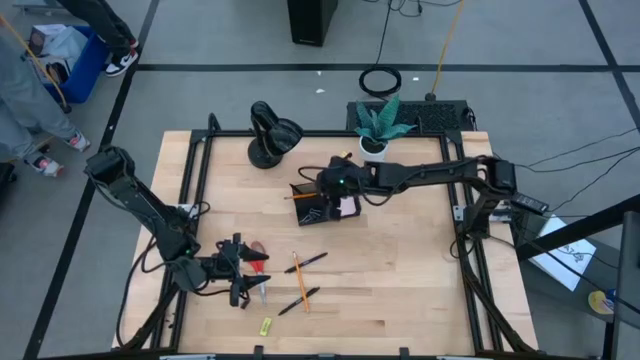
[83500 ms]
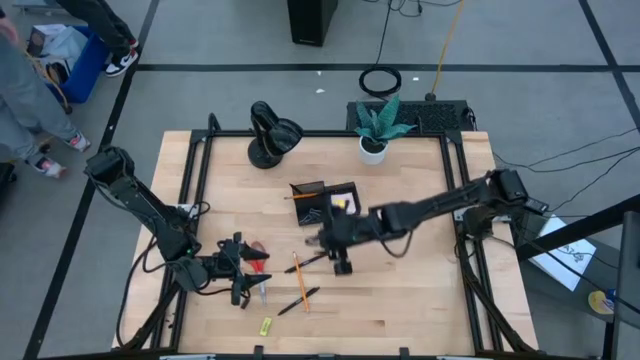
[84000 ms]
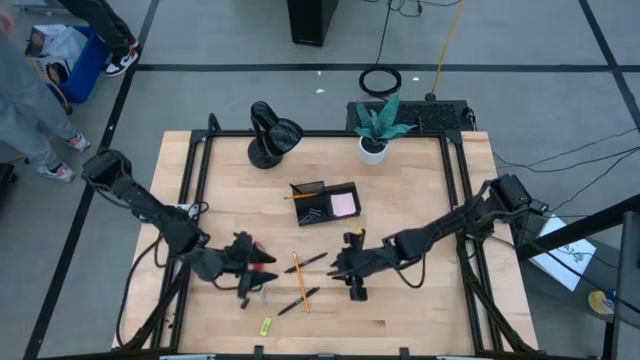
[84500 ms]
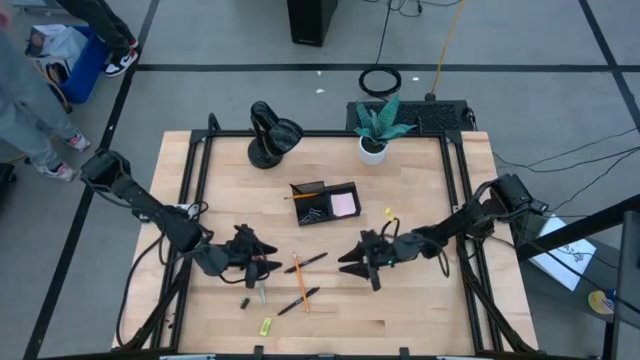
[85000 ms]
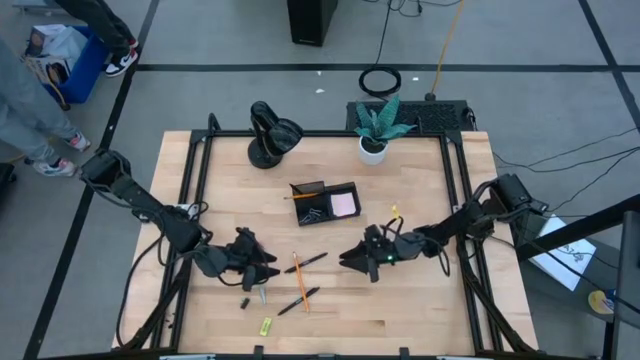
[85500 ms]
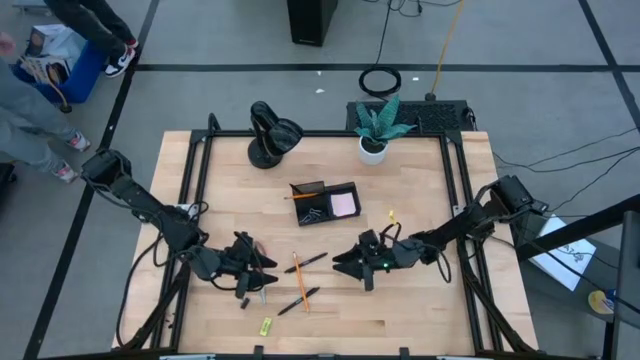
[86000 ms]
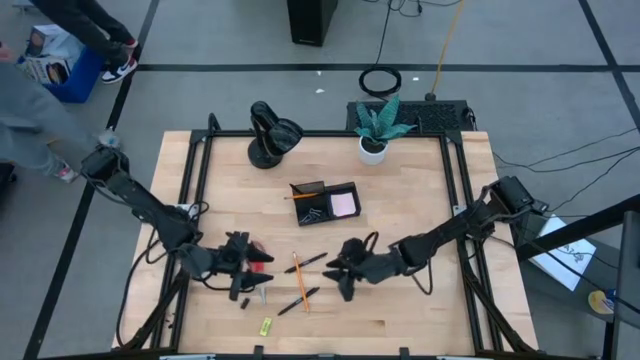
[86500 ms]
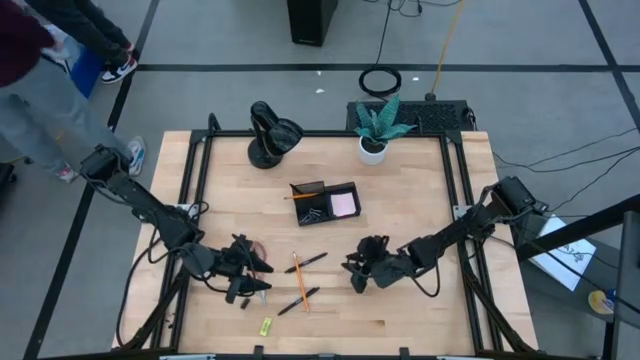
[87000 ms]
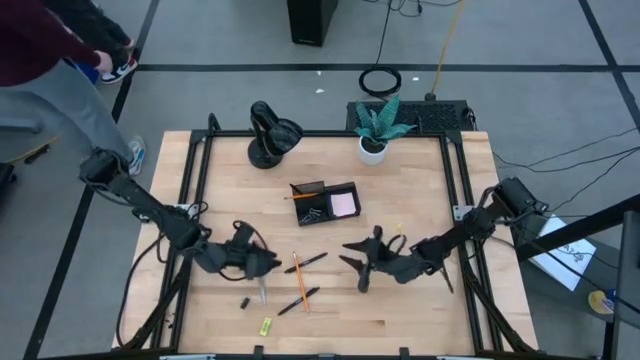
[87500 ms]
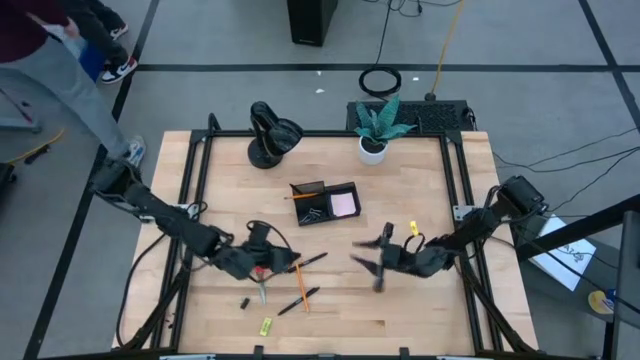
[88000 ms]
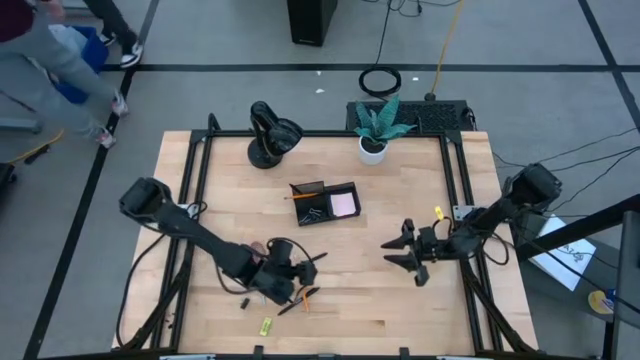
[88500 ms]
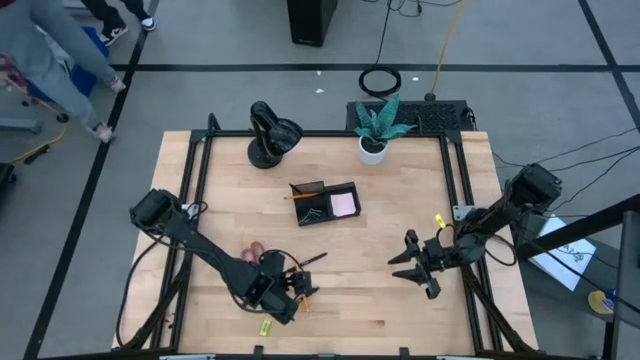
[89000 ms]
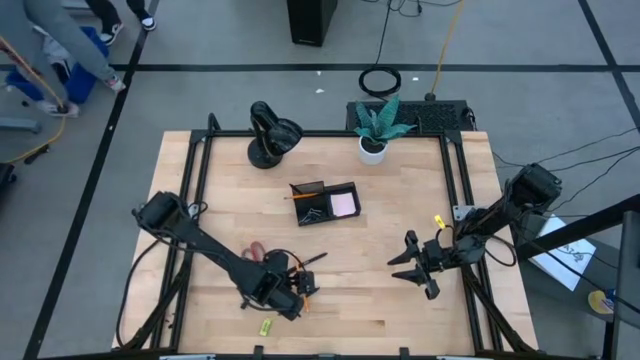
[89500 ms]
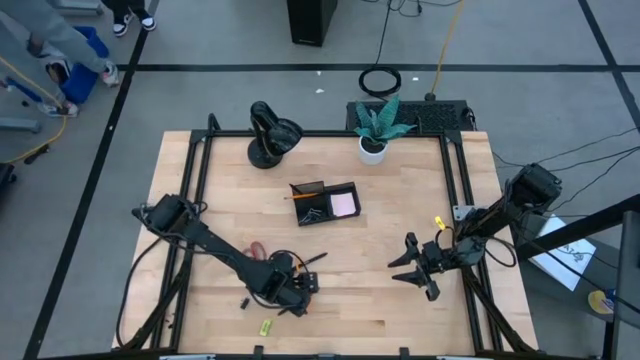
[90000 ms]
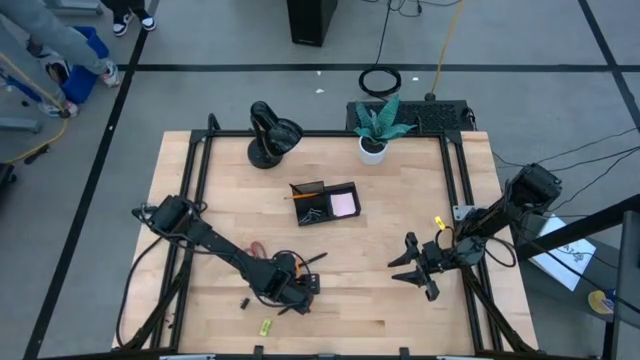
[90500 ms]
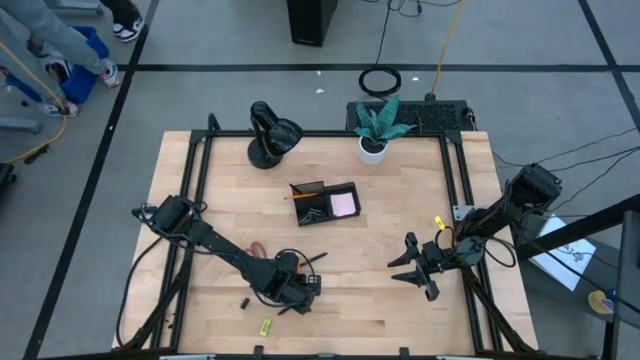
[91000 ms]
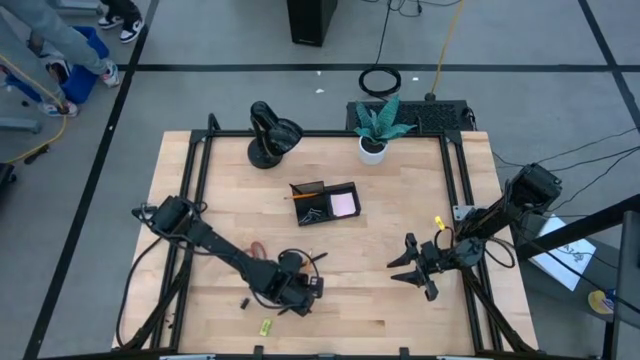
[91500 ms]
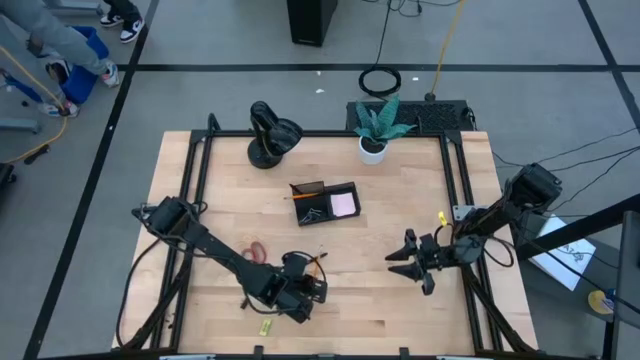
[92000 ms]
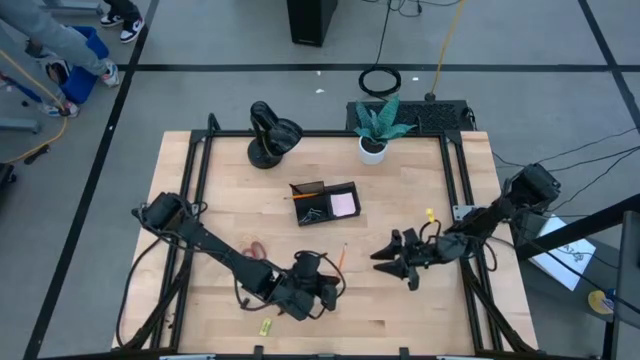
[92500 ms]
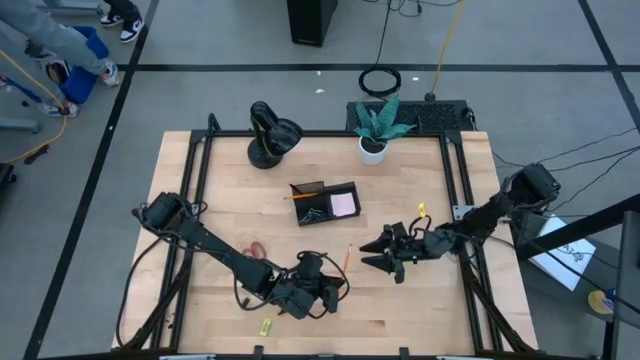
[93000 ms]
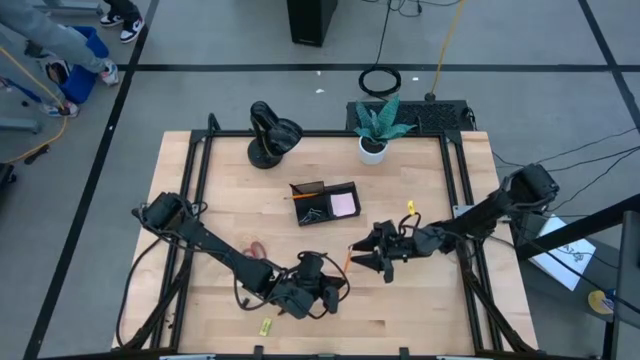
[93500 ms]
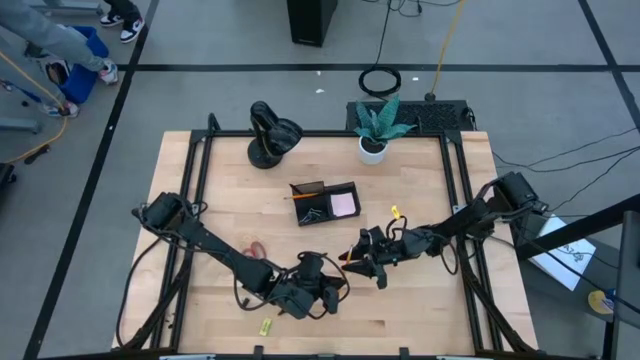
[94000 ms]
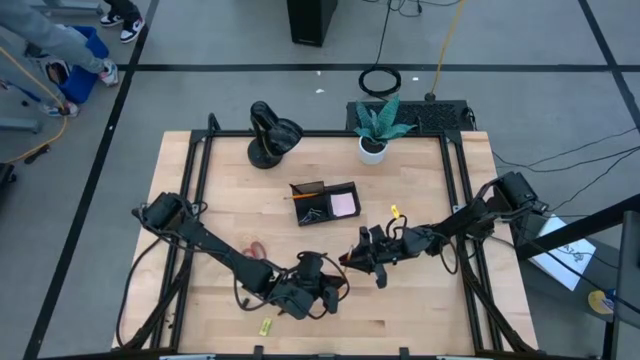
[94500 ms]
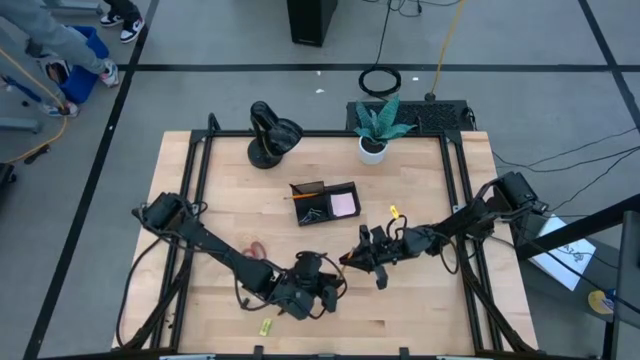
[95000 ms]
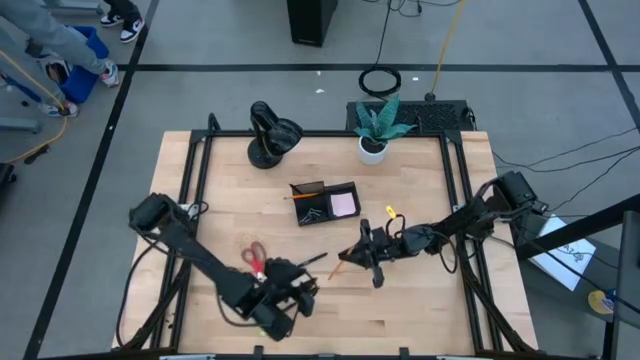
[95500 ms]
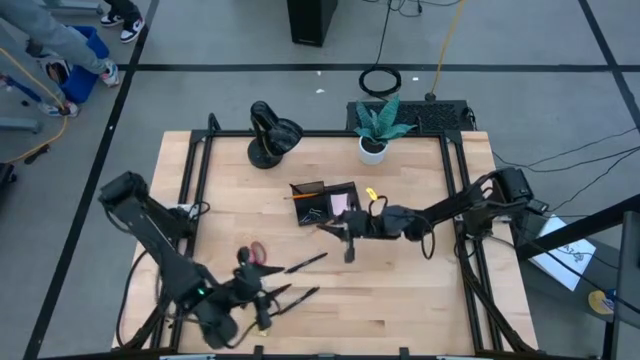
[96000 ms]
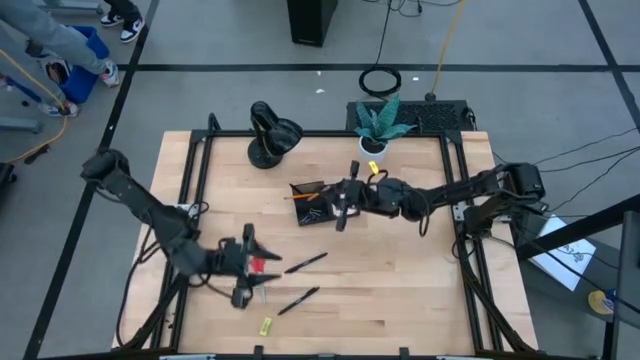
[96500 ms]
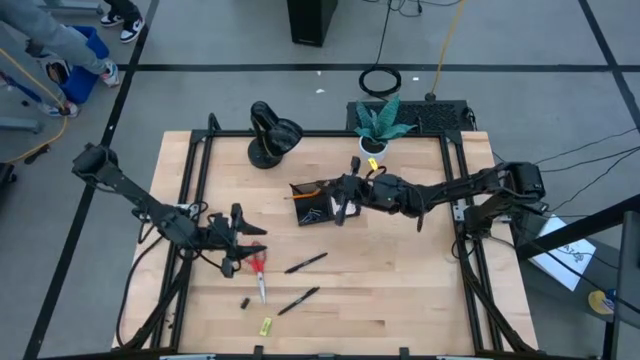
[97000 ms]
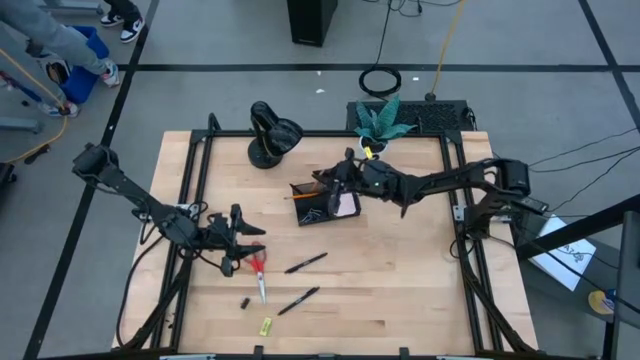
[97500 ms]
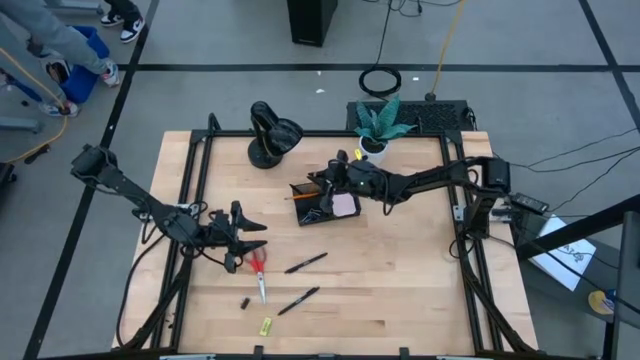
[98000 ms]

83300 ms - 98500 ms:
Task: Pick and place office supplies into organizer
Put the orange pencil into the desk organizer

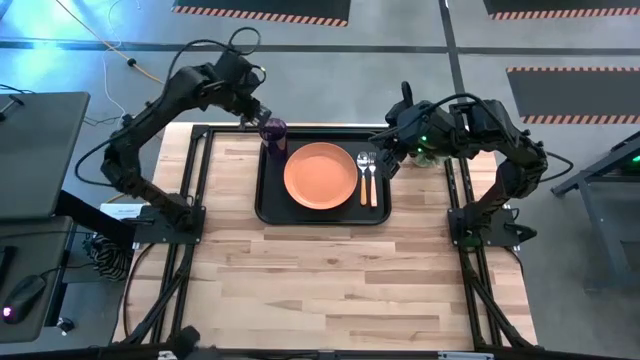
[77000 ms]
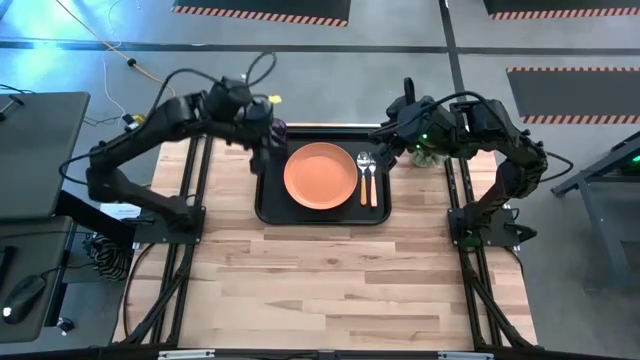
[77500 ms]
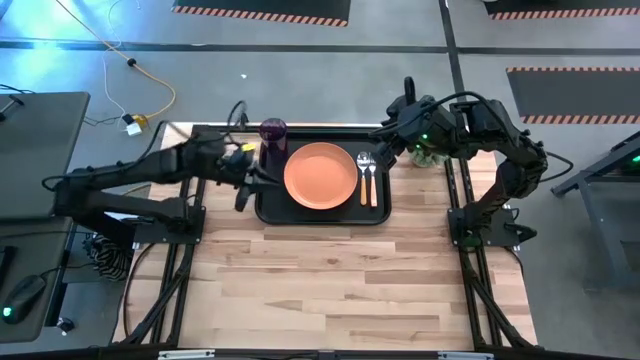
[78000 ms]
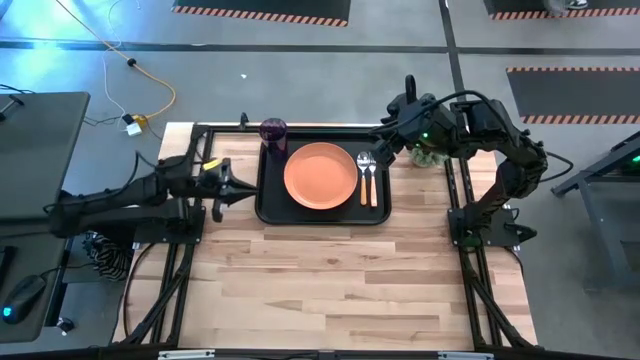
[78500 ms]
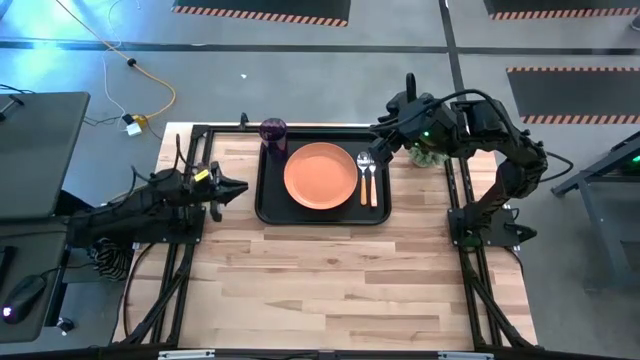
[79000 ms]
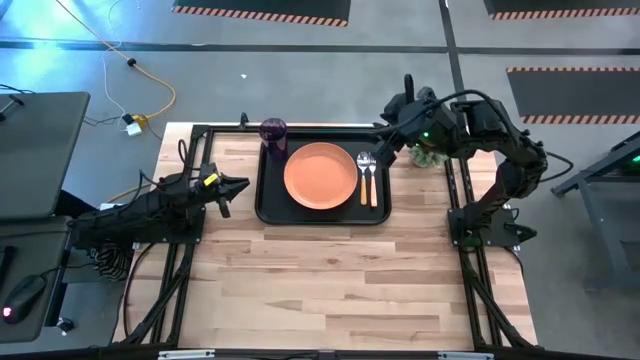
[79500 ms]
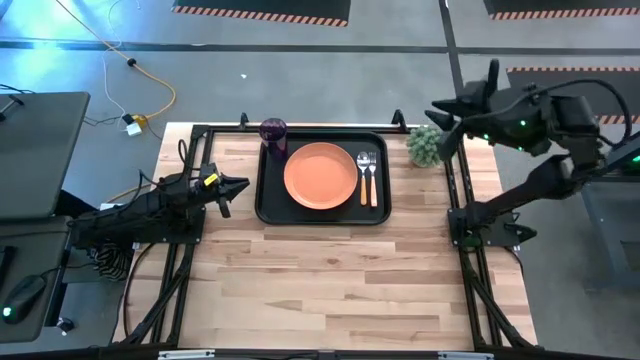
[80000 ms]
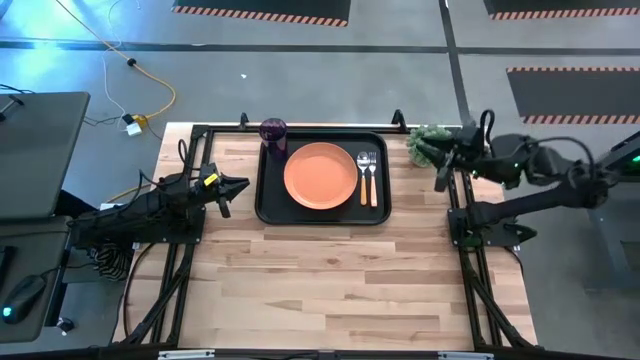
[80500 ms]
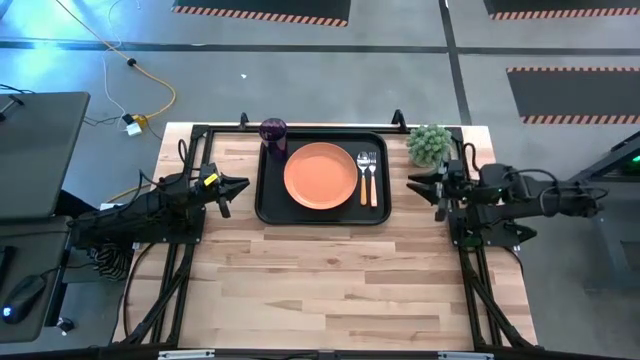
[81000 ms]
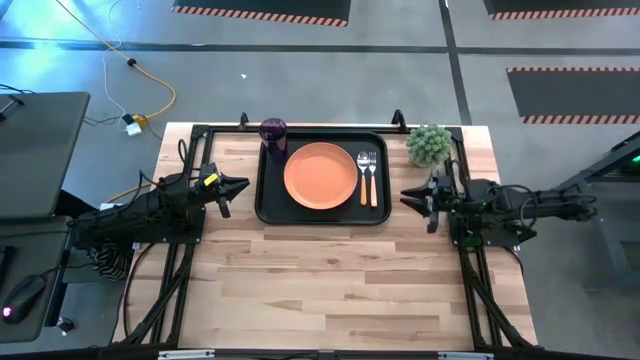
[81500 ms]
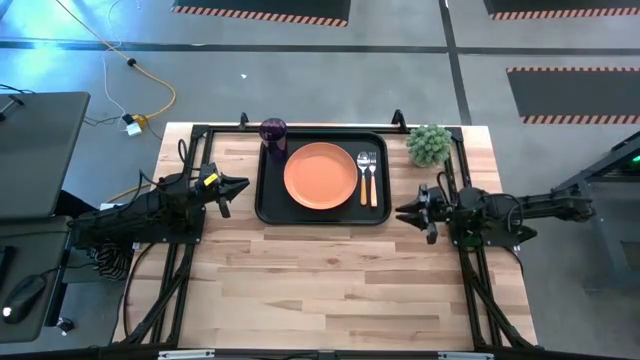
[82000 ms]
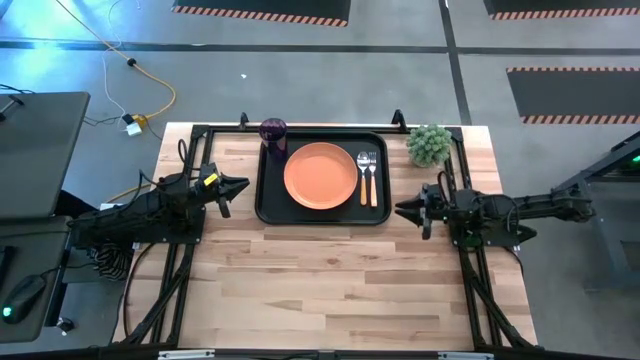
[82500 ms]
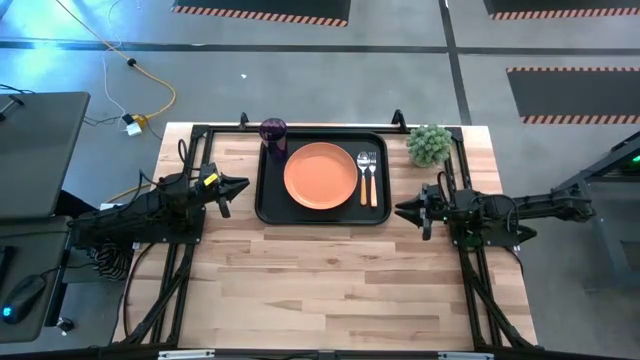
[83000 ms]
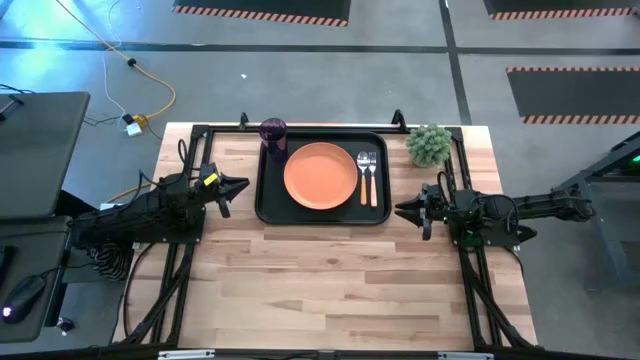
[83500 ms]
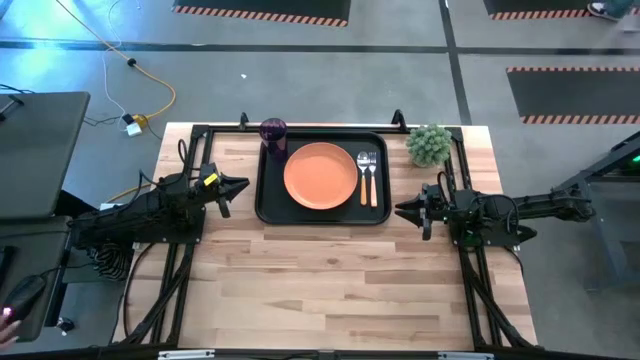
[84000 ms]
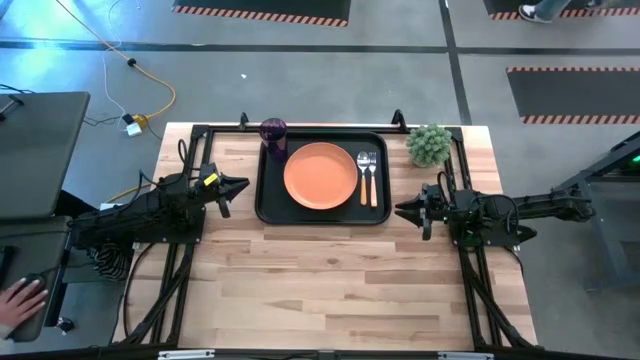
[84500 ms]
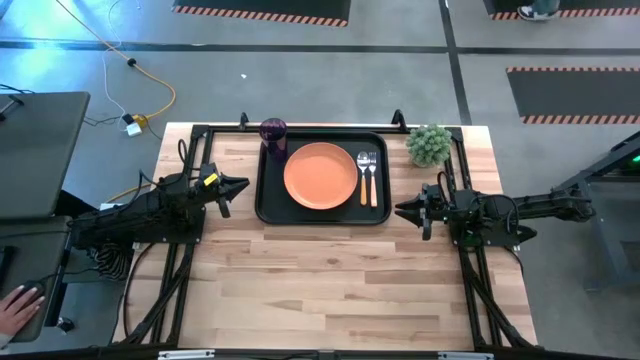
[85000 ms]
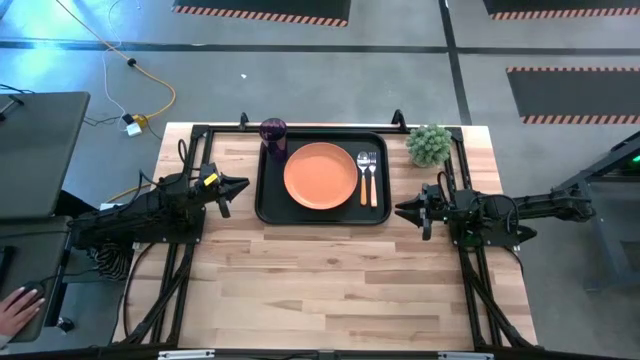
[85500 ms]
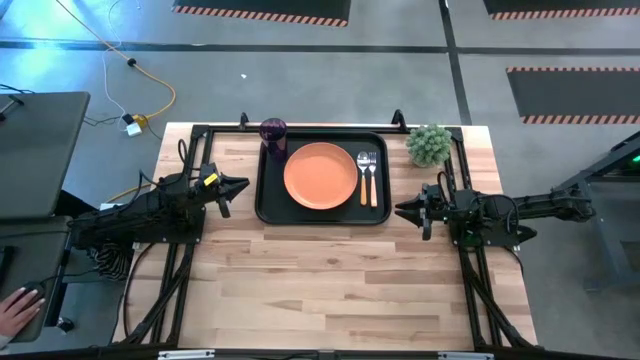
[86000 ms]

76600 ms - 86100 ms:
Task: Pick and place plate/cup/fork/spoon on tray
Return to Home Position
